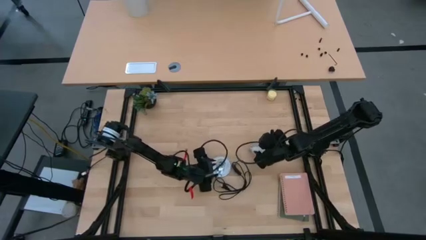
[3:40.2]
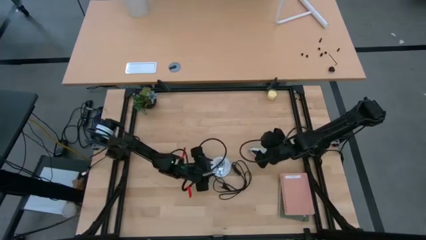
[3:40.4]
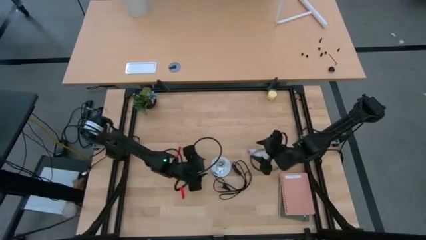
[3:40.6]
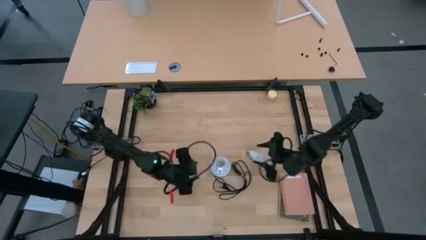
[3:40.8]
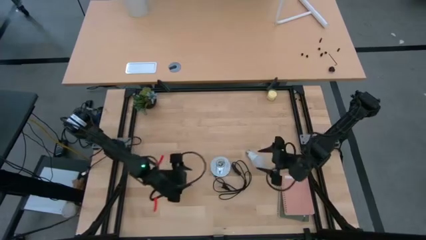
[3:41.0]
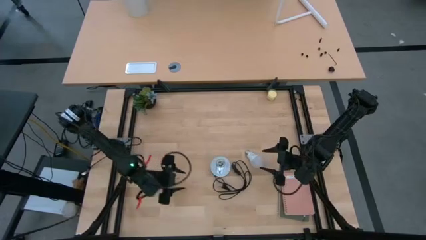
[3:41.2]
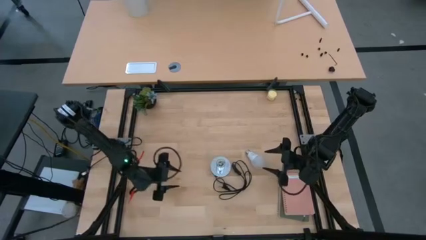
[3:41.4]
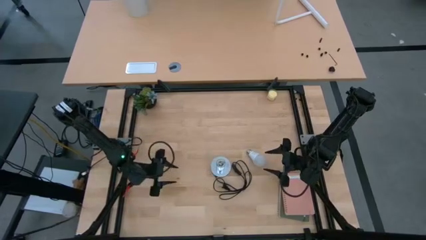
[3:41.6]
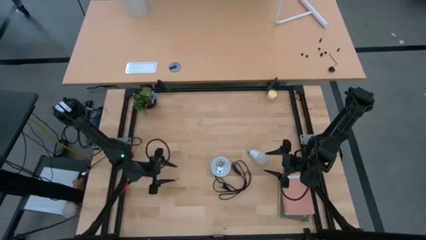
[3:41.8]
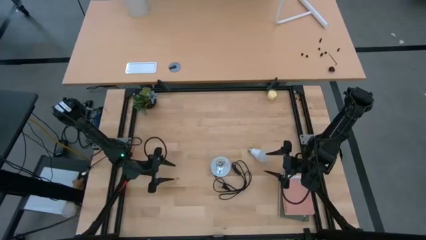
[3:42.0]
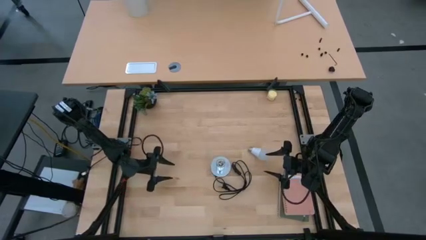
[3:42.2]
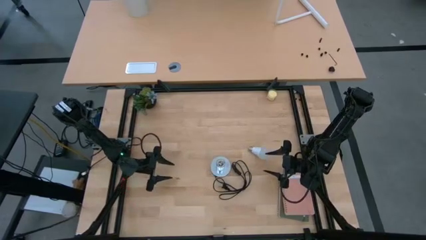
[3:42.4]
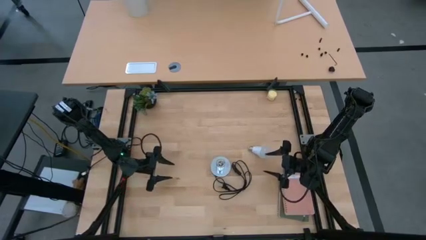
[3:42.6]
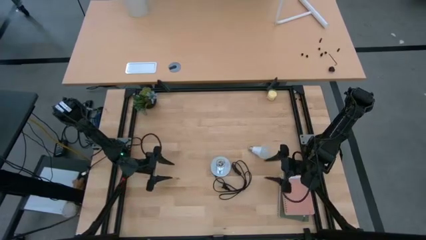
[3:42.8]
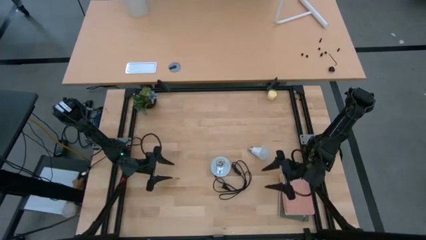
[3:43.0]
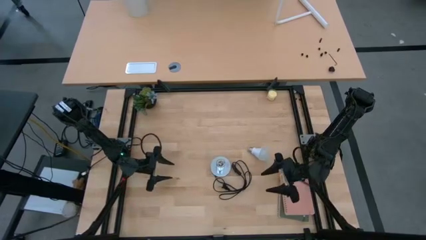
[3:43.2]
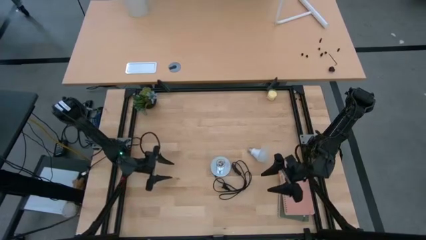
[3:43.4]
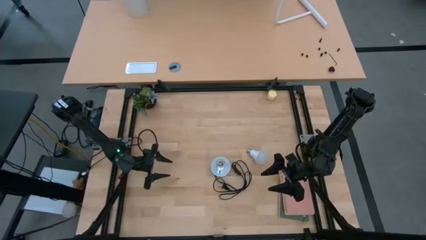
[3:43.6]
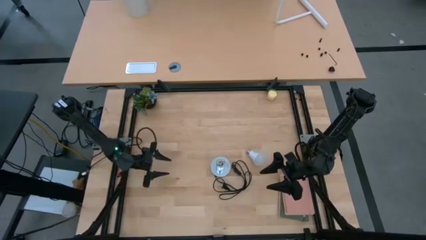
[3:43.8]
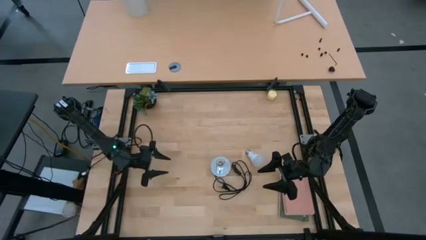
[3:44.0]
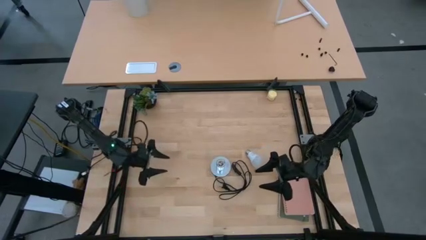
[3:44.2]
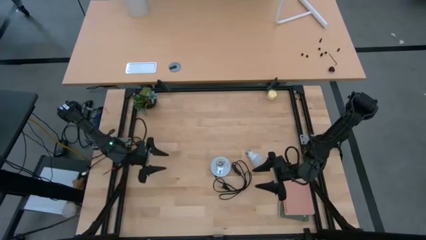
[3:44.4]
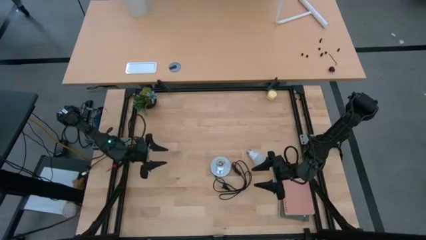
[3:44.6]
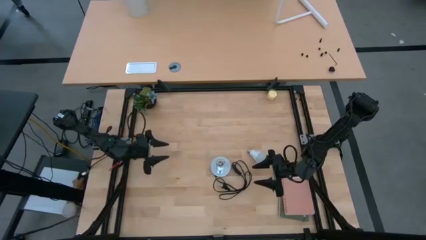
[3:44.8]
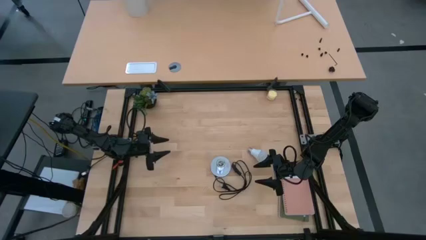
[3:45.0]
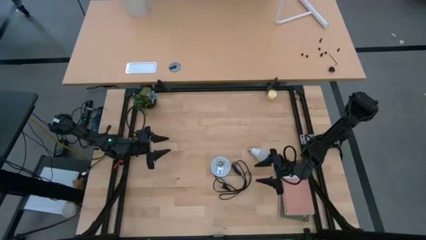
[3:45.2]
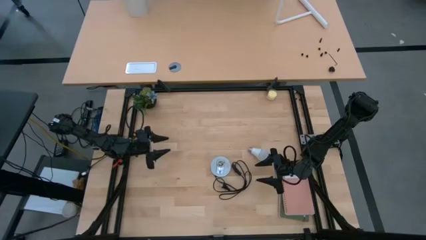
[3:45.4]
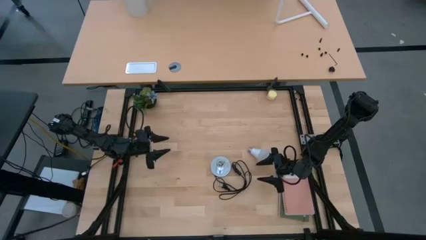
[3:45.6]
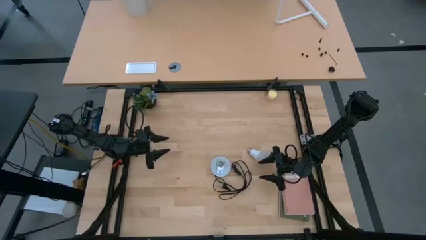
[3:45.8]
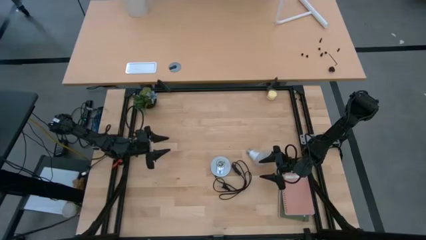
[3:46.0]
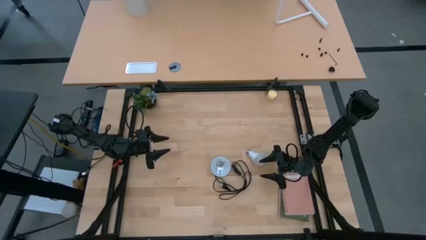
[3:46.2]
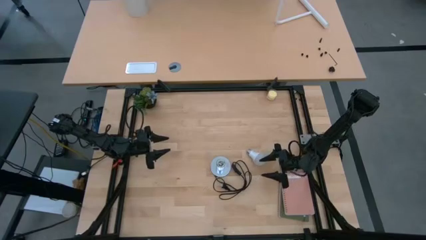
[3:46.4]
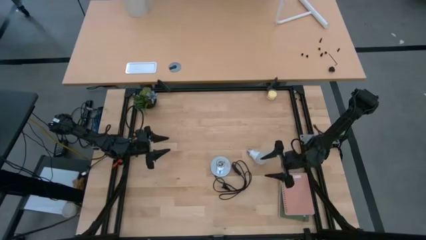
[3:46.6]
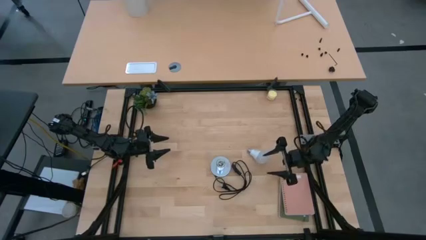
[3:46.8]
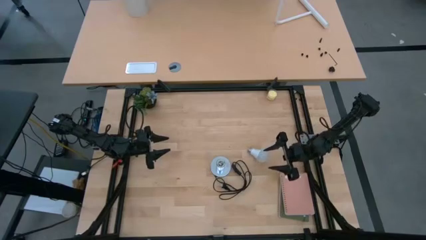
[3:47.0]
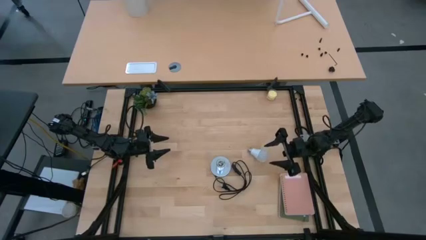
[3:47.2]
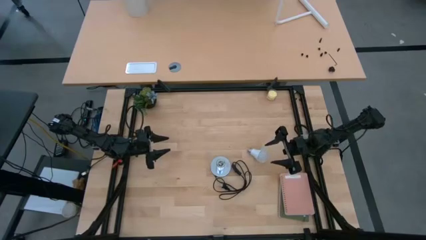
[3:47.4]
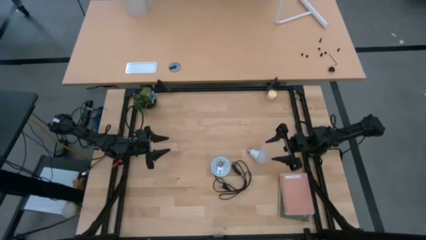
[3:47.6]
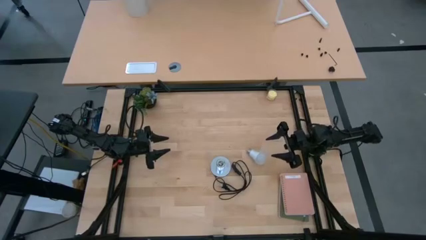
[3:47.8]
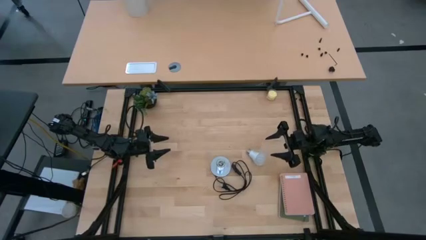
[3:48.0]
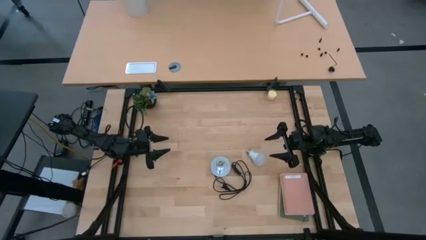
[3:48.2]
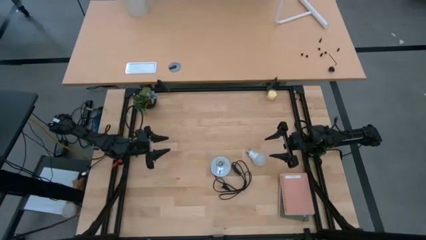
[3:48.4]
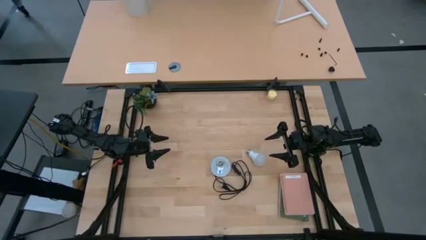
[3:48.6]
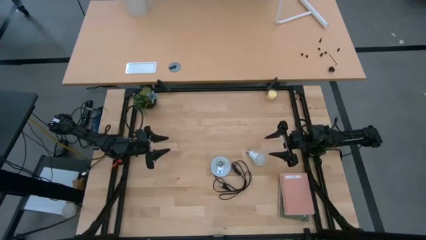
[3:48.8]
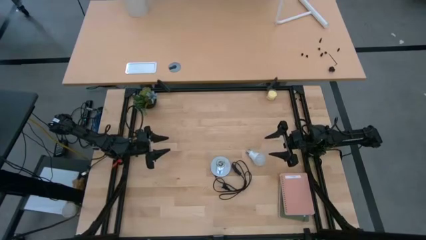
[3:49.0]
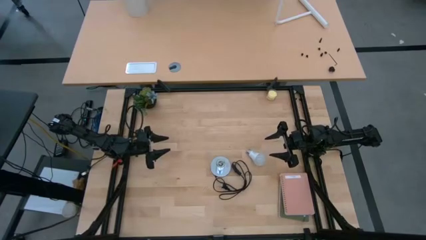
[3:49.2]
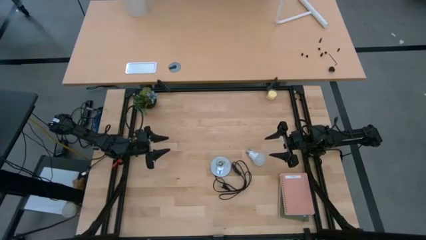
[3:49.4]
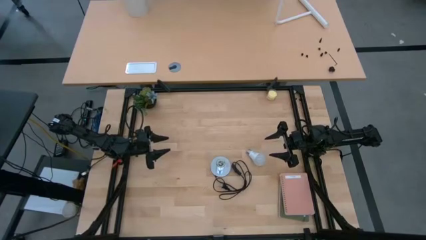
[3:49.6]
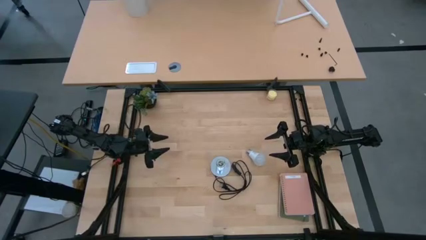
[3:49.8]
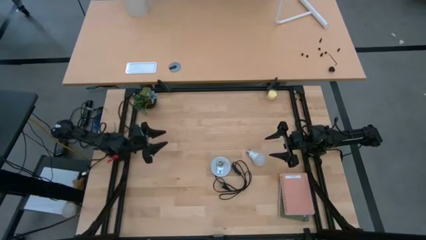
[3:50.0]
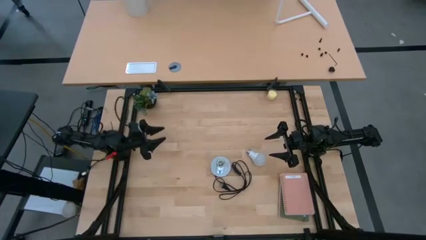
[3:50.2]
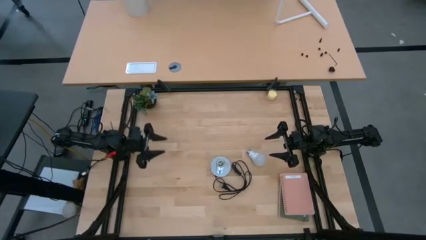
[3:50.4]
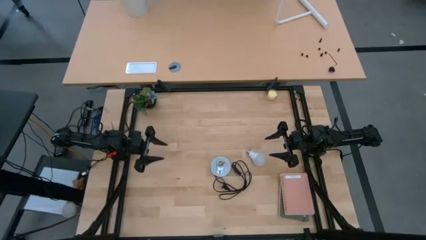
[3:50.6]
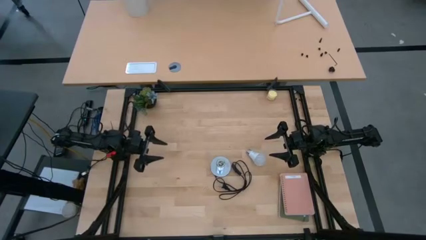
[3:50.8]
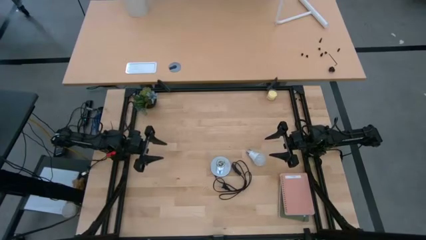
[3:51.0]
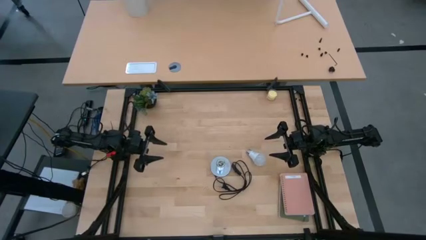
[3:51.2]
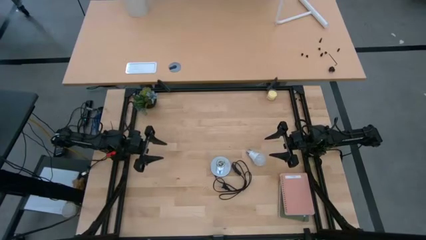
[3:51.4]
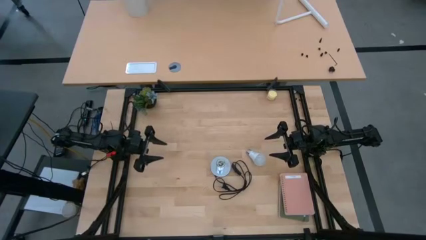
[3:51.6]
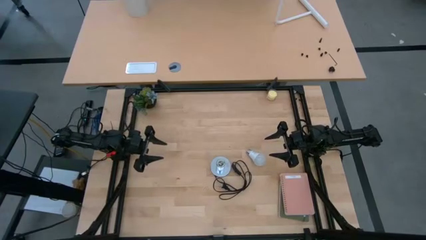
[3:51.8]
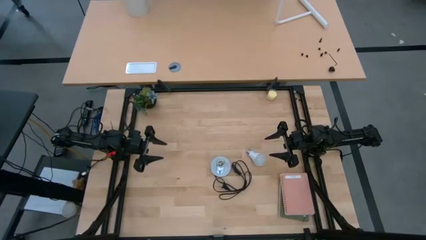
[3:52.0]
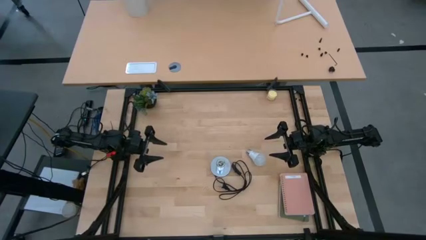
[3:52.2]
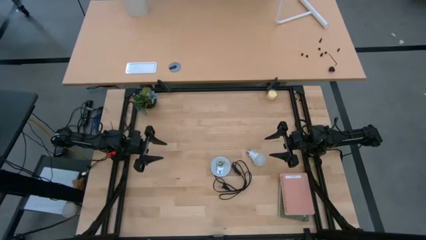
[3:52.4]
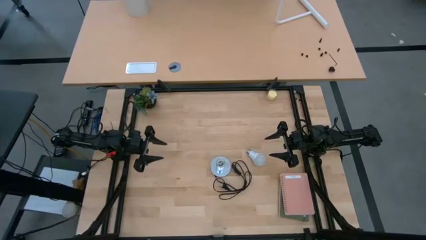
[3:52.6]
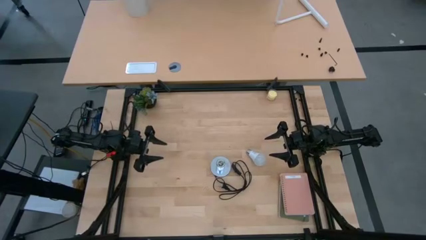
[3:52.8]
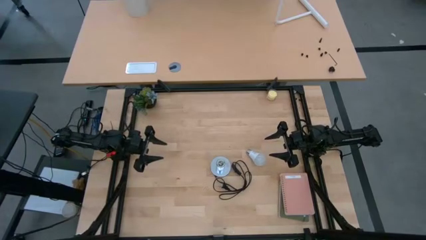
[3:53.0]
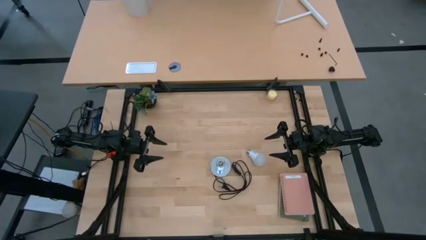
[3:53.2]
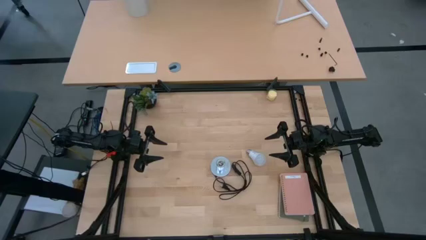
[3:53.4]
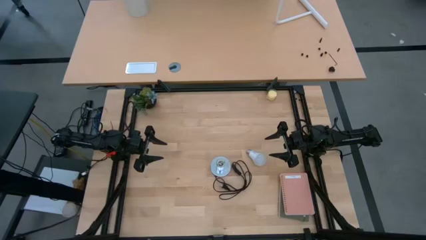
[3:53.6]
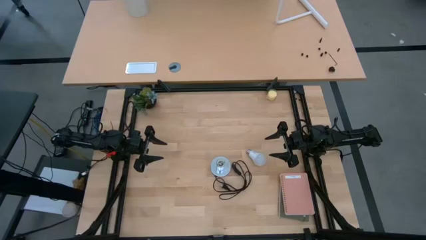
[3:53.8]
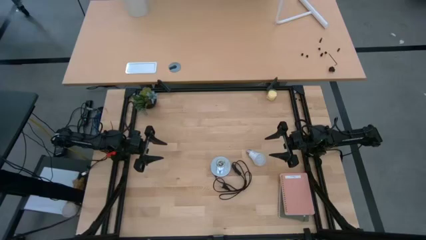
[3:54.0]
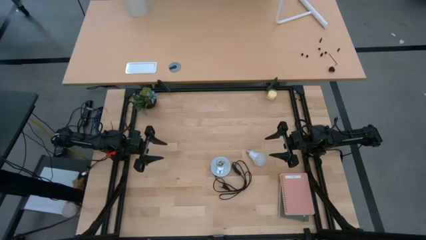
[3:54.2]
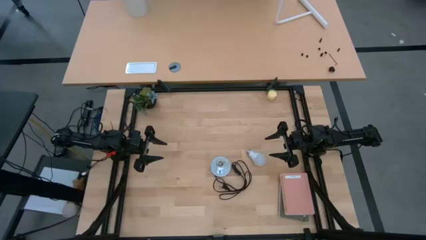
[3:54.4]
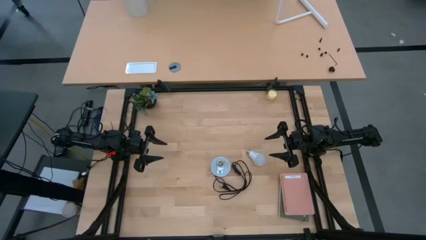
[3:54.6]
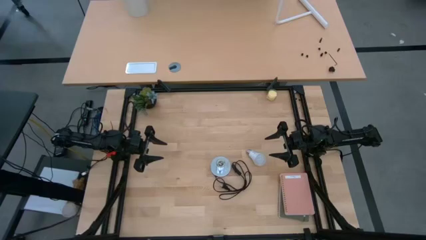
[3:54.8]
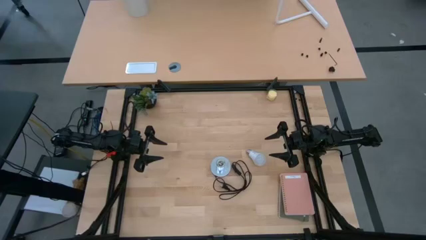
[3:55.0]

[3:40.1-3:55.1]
Task: Screw lightbulb
Return to Home Position
